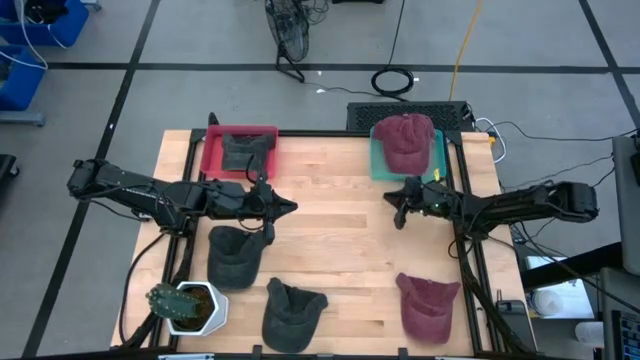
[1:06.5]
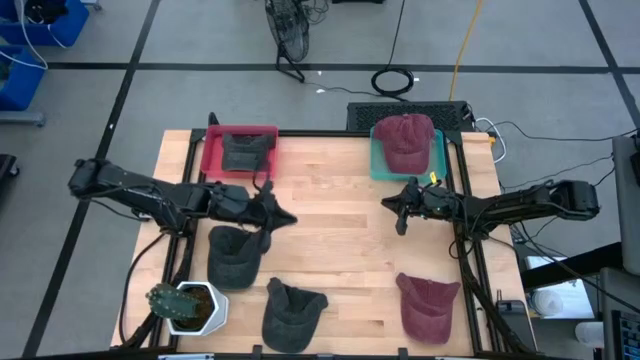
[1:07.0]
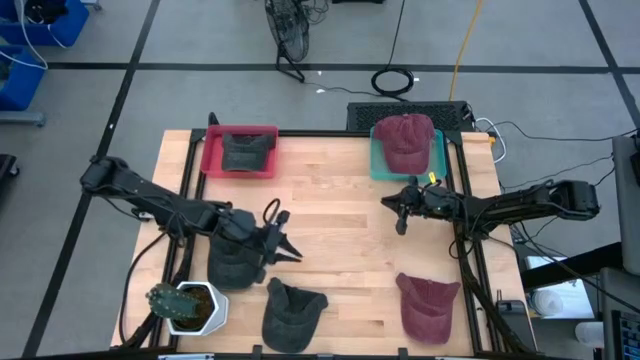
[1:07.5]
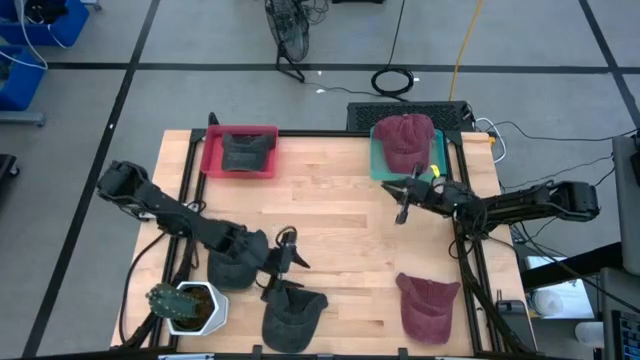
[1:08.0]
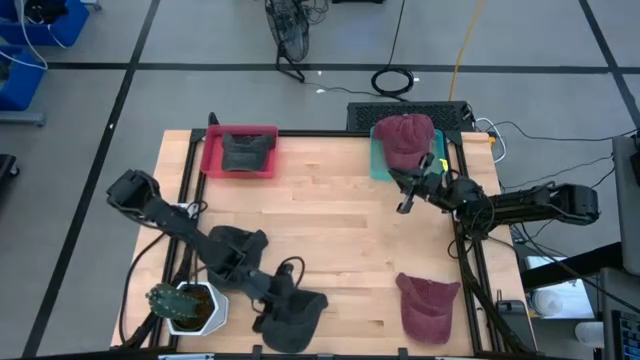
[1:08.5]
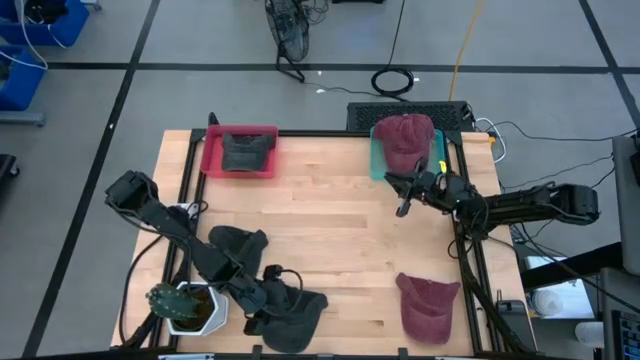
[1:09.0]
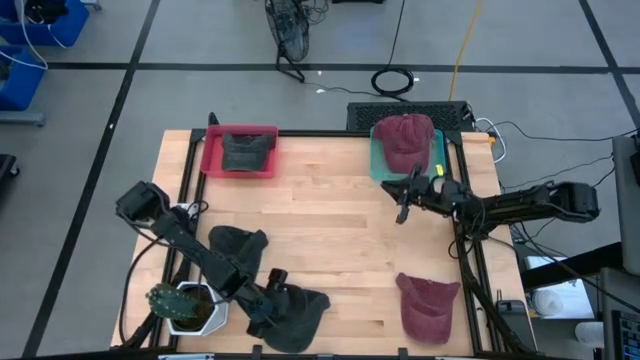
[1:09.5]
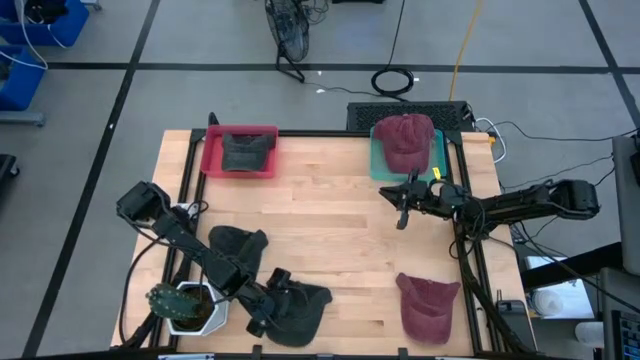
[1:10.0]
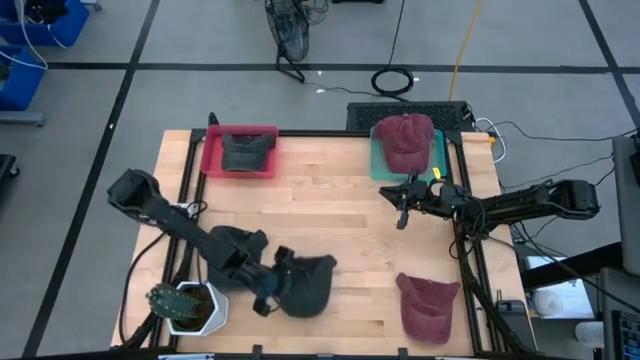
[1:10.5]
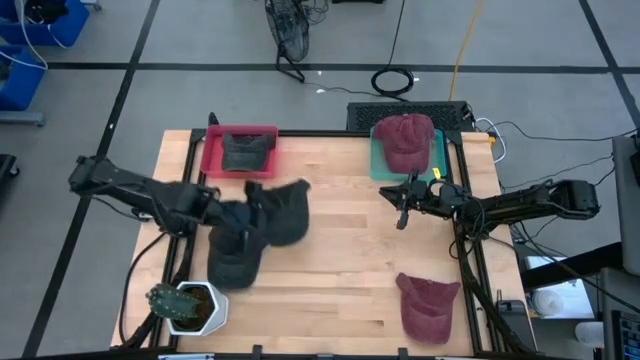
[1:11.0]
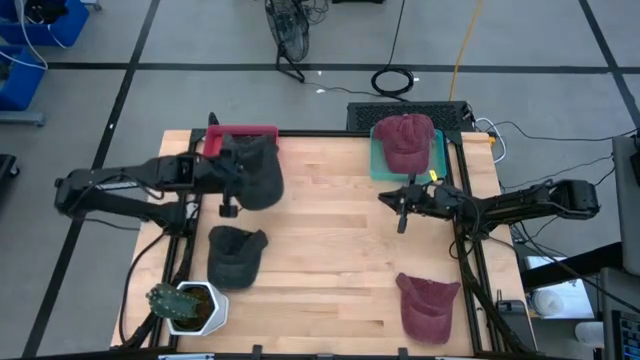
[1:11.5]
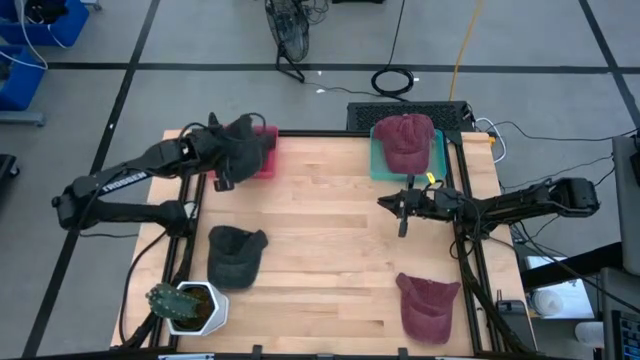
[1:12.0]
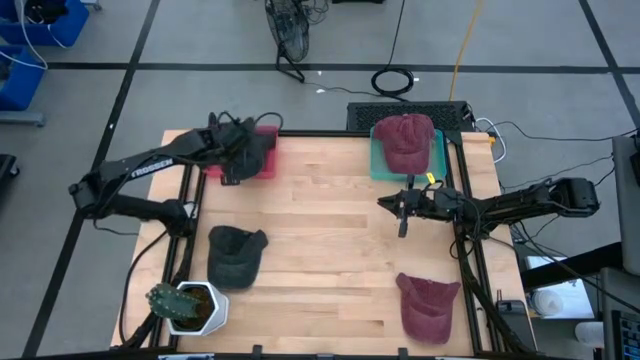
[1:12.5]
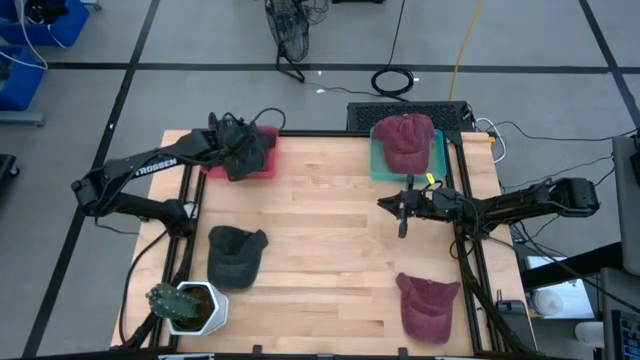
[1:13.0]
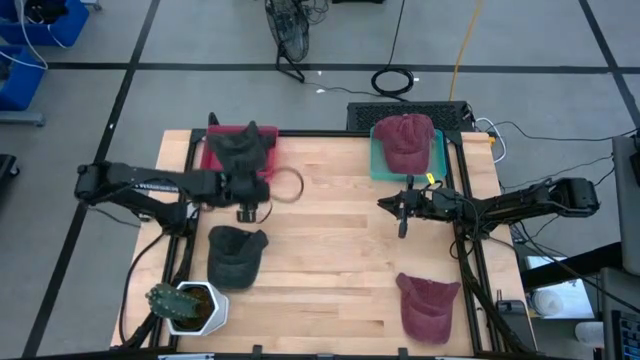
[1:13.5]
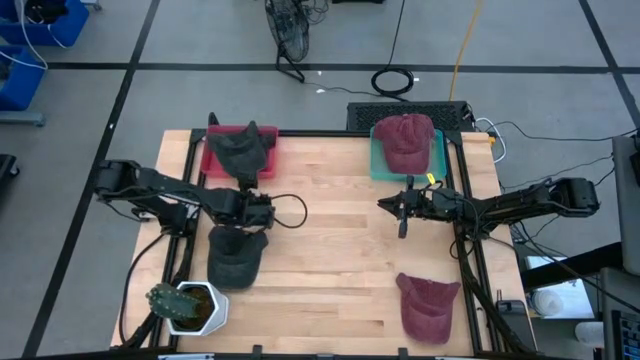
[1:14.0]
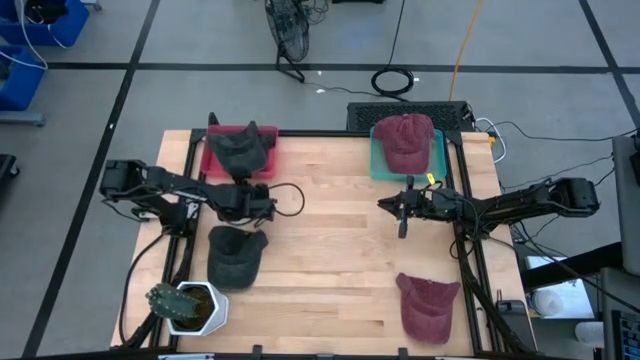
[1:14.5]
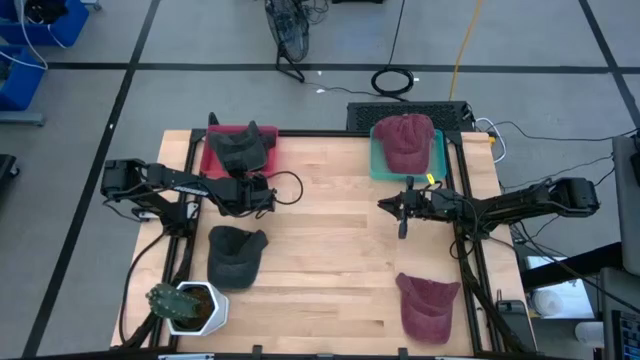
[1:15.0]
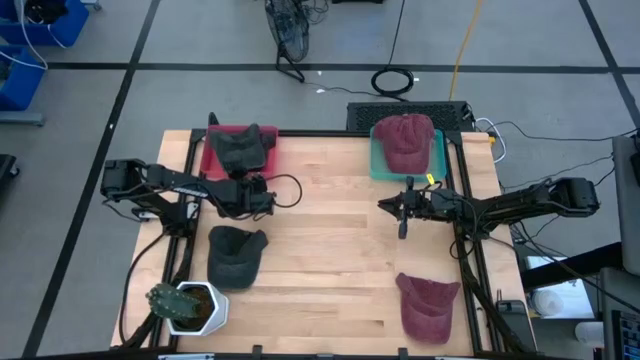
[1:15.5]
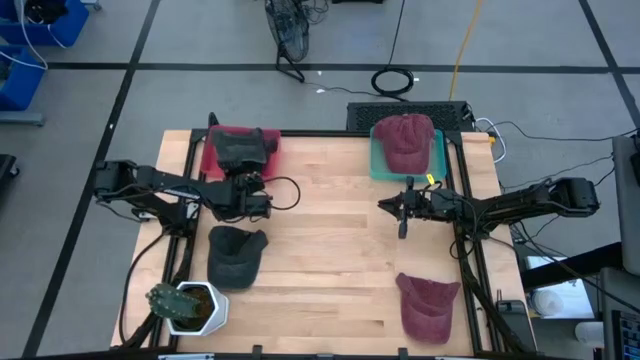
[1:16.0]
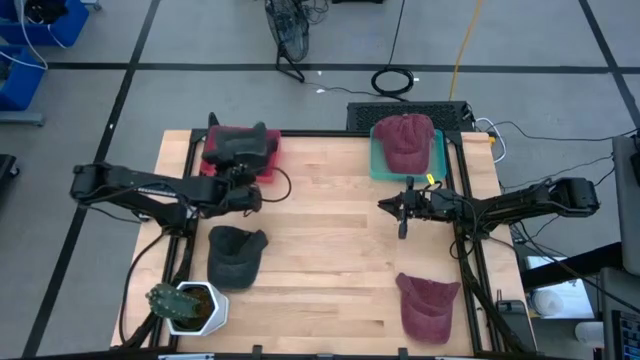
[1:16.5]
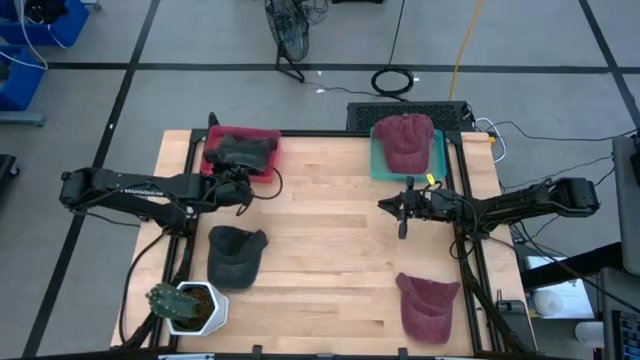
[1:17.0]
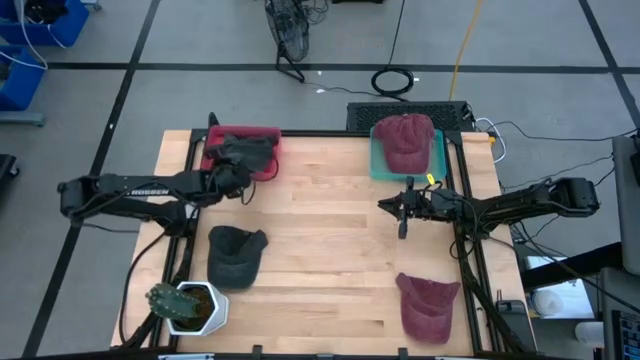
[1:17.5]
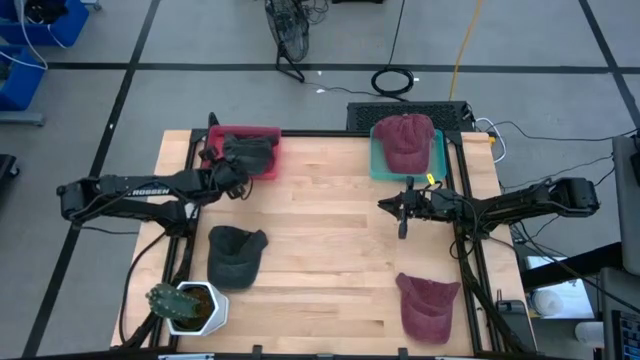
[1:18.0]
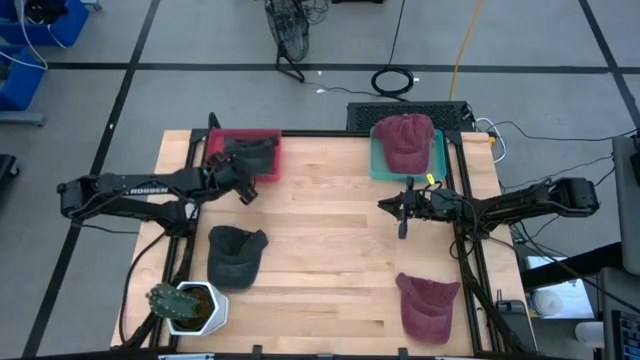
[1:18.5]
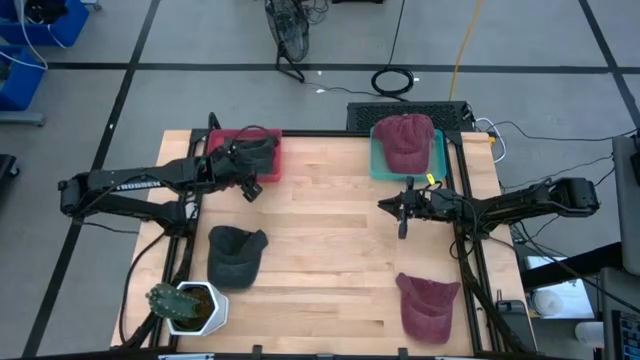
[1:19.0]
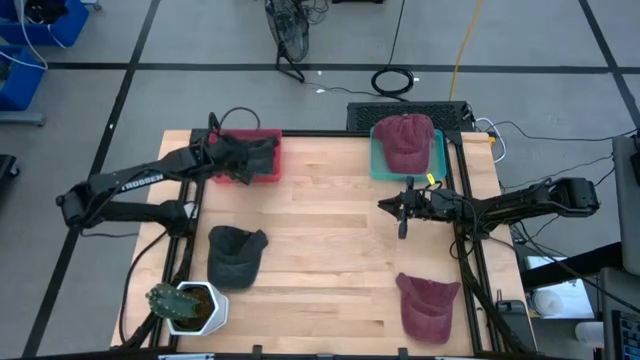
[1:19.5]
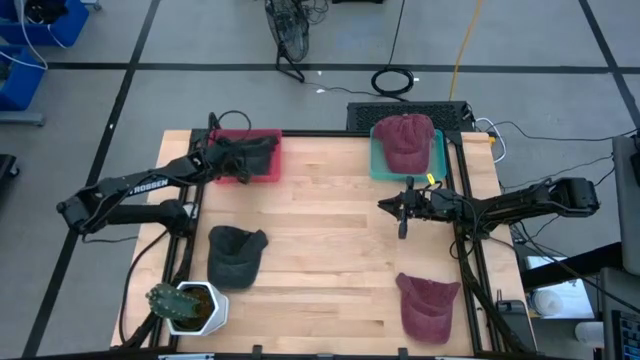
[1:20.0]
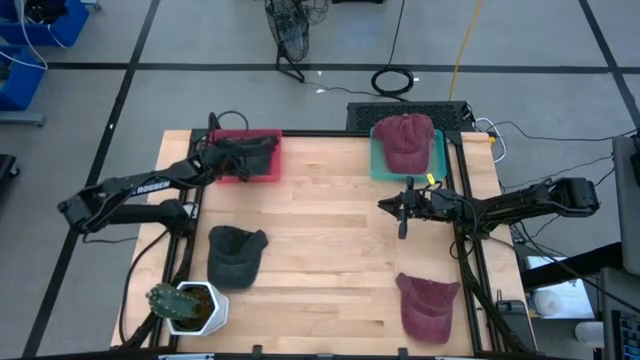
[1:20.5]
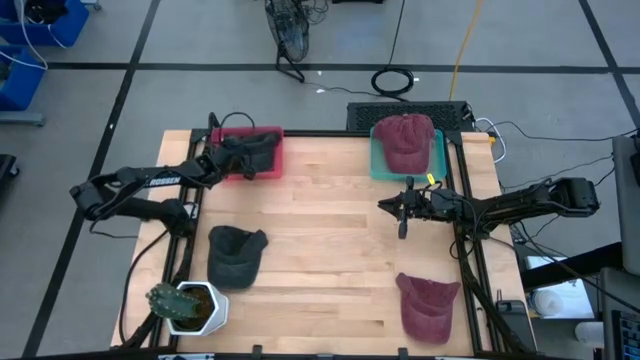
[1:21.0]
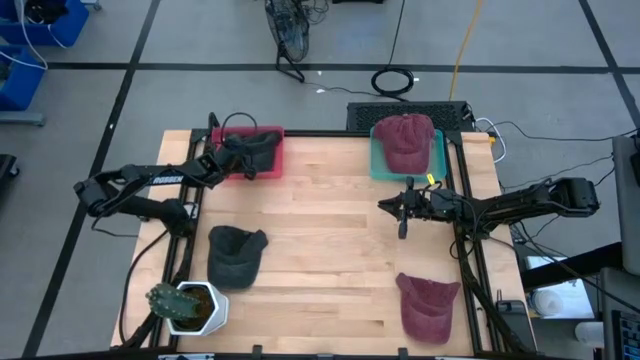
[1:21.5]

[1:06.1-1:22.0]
Task: Pick & Place hat
Put the bottom black cap into the red bin

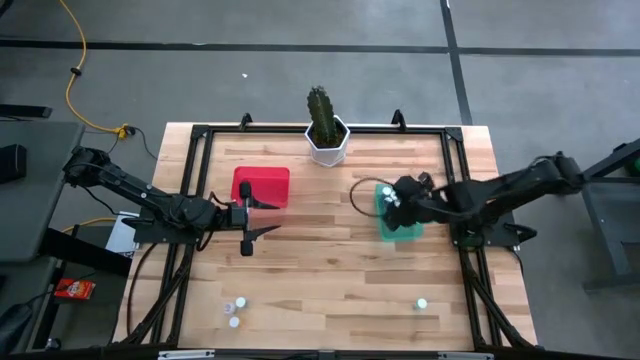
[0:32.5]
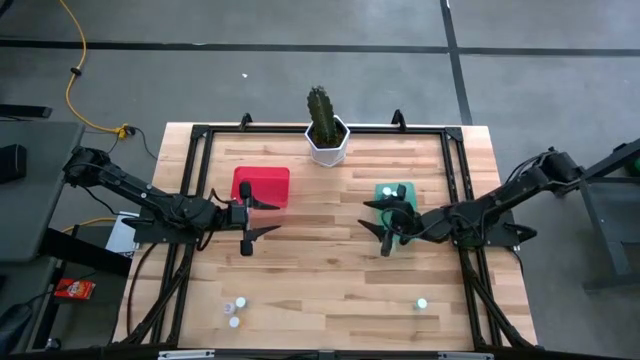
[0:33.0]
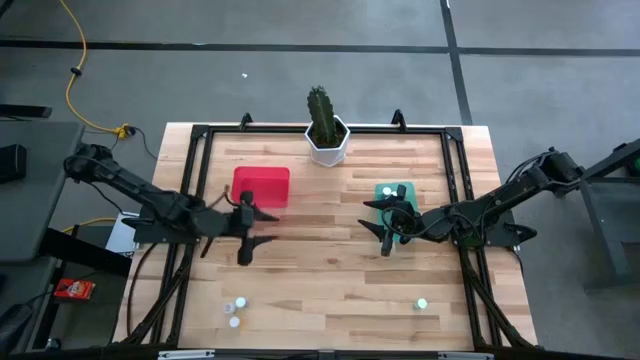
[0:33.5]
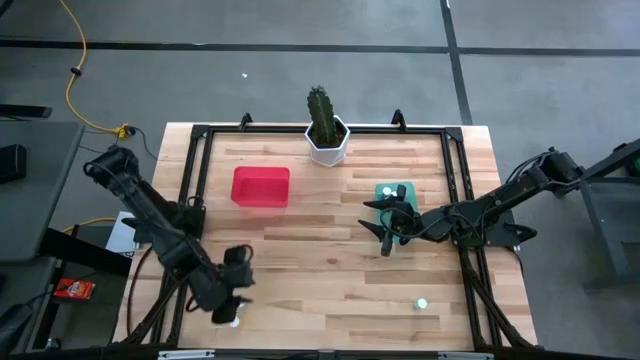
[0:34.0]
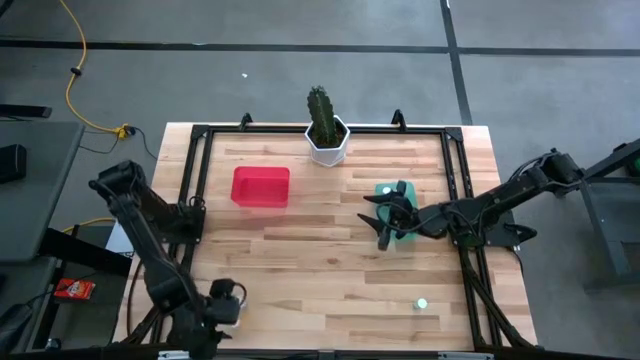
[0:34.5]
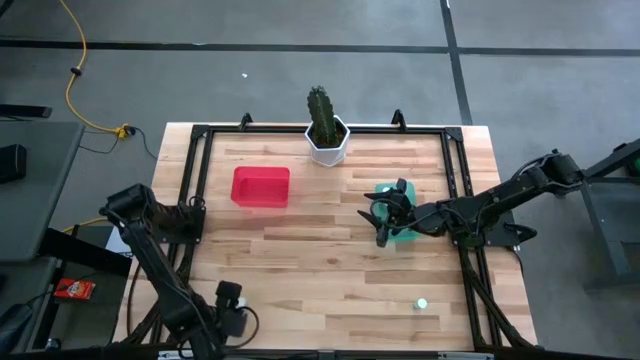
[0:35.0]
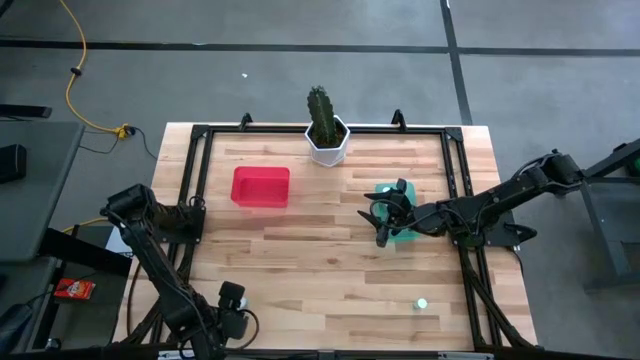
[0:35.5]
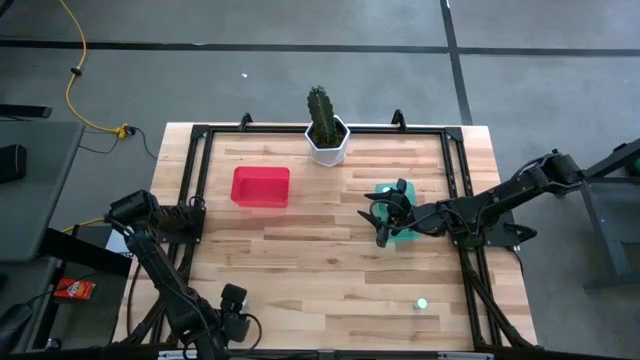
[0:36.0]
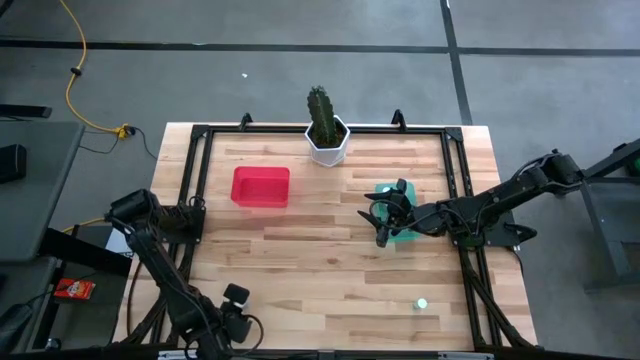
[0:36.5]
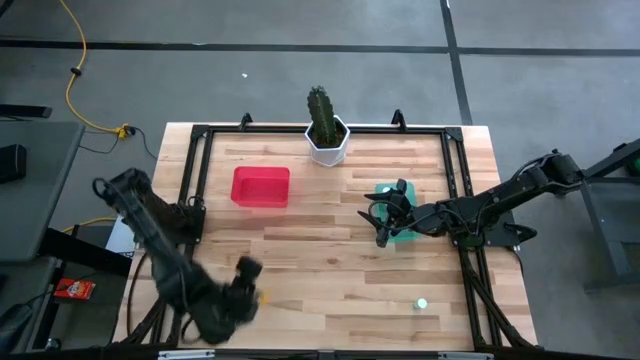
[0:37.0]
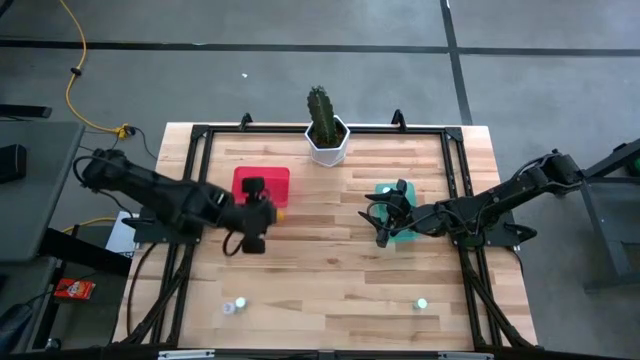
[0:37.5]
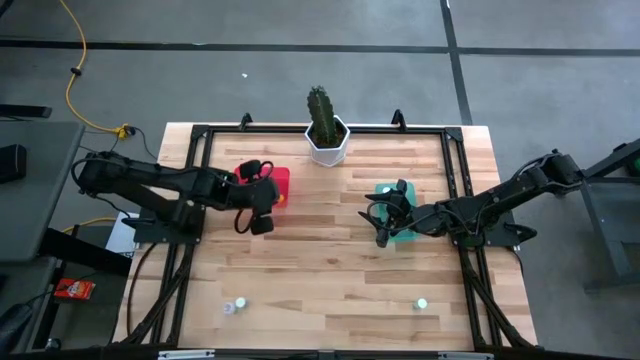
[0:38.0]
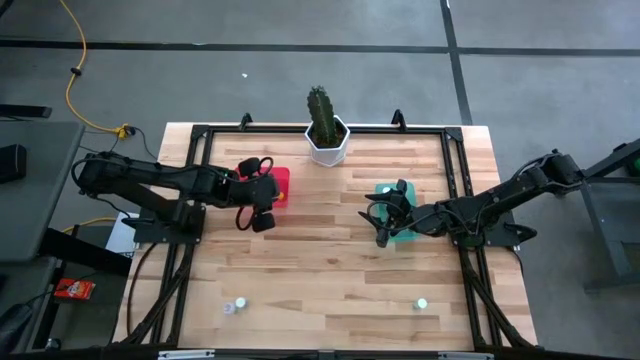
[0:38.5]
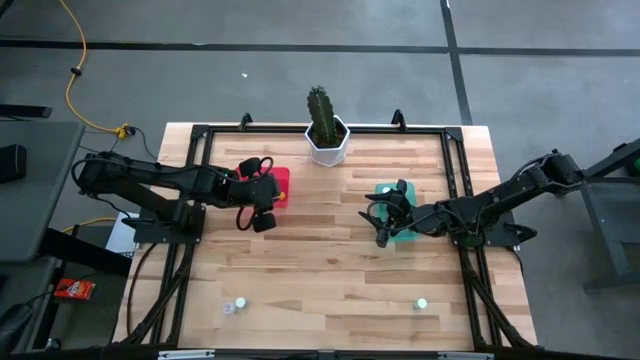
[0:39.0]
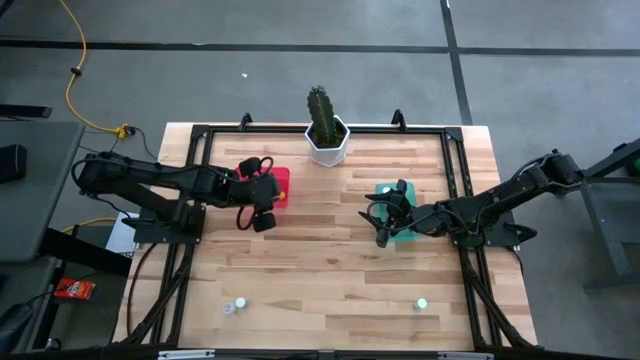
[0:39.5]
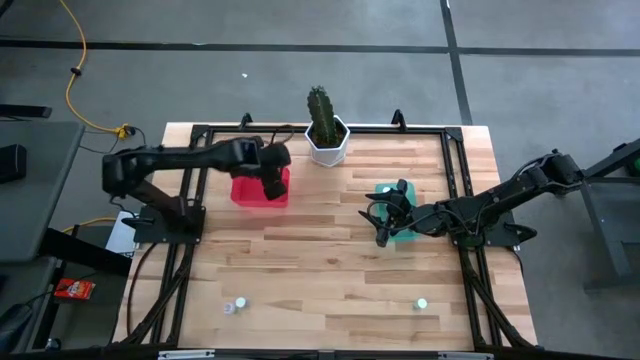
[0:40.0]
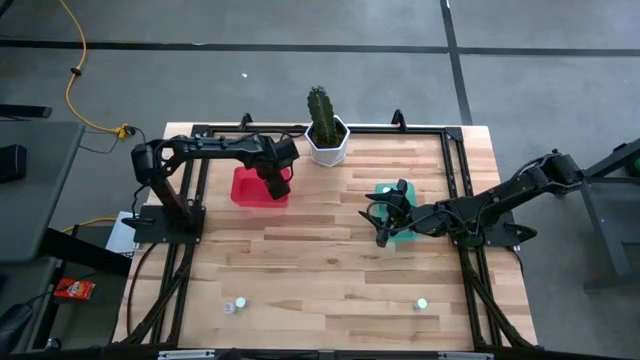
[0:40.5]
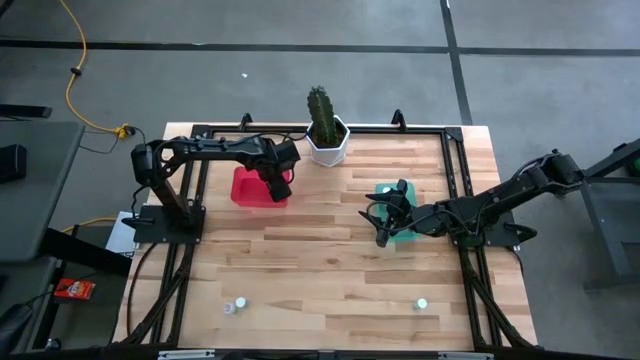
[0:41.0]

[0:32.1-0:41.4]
Task: Pick and place medicine bottles into bin by pill shape (circle, oval)
Put the orange tablet bottle into the red bin
